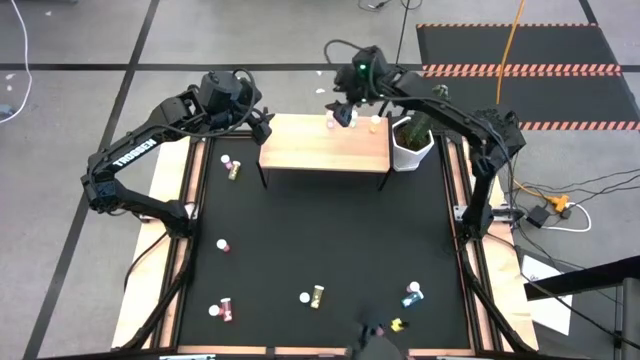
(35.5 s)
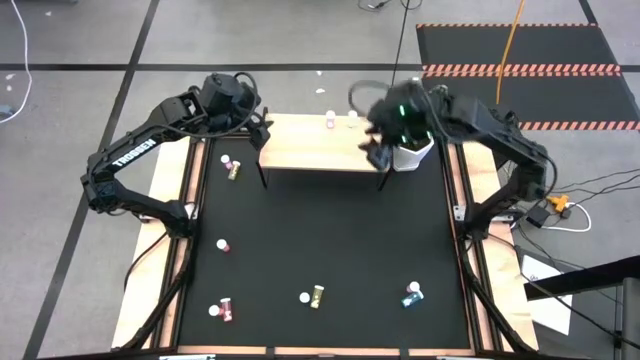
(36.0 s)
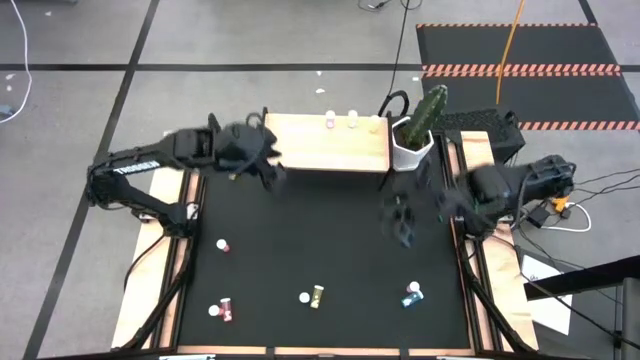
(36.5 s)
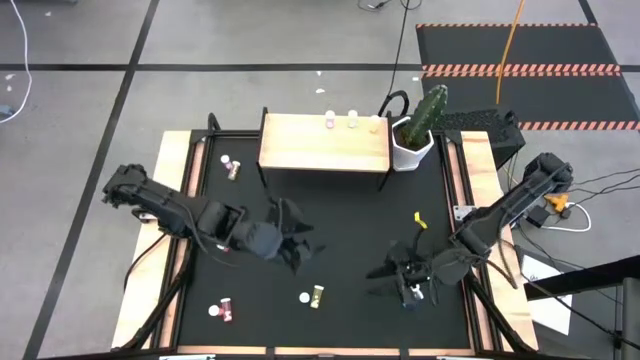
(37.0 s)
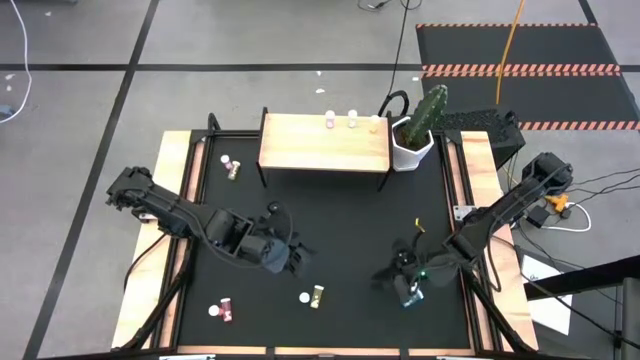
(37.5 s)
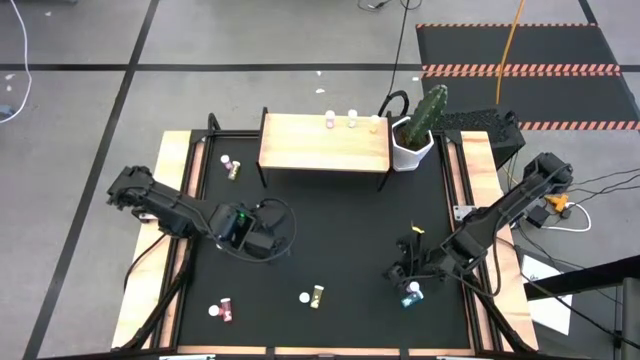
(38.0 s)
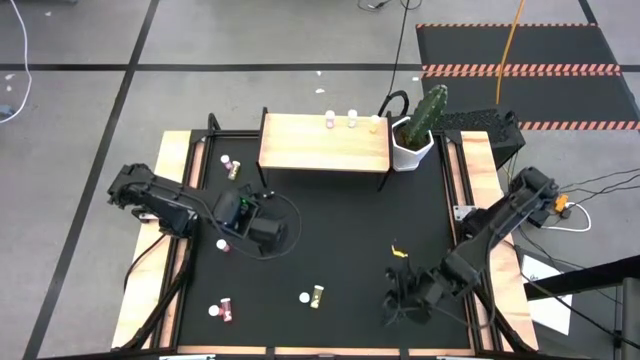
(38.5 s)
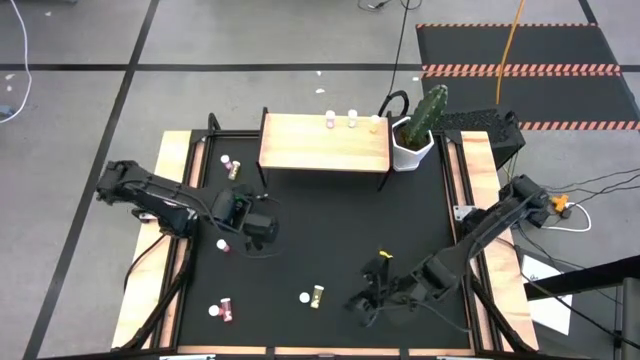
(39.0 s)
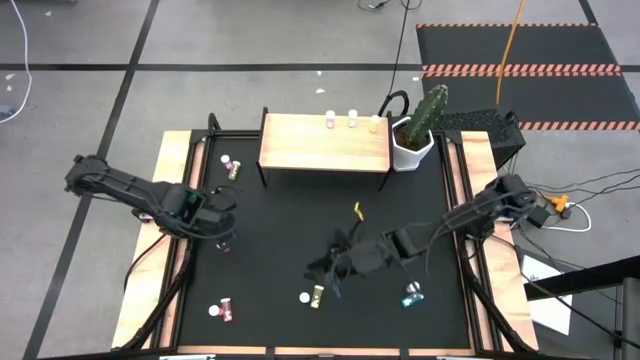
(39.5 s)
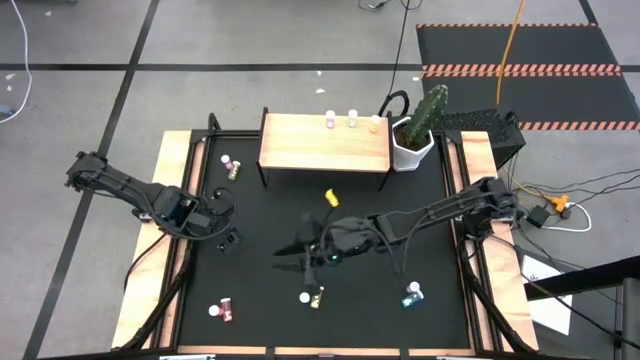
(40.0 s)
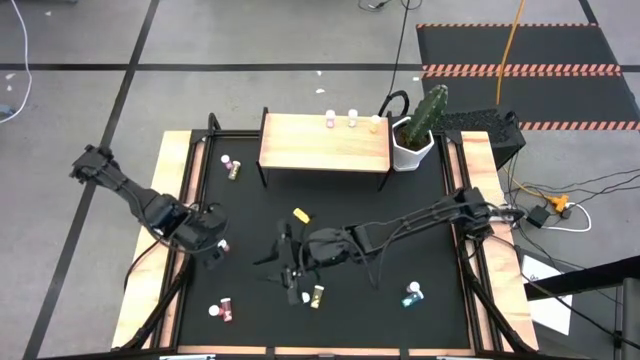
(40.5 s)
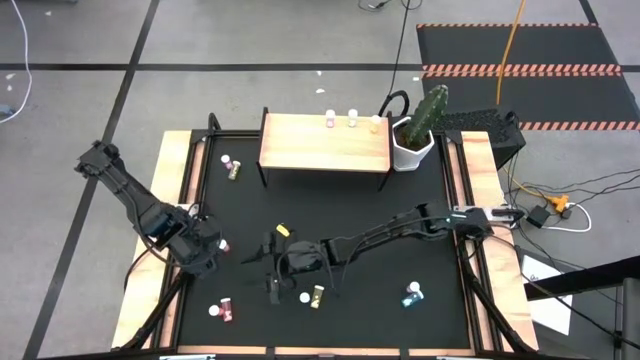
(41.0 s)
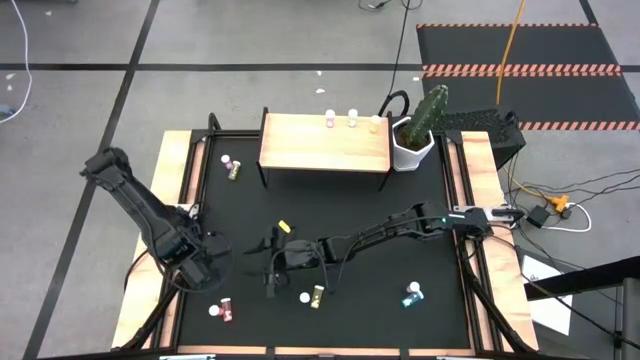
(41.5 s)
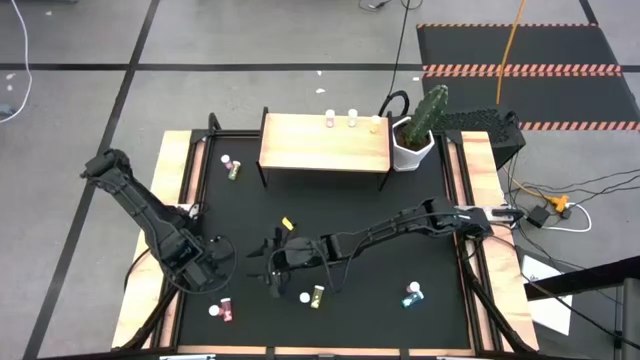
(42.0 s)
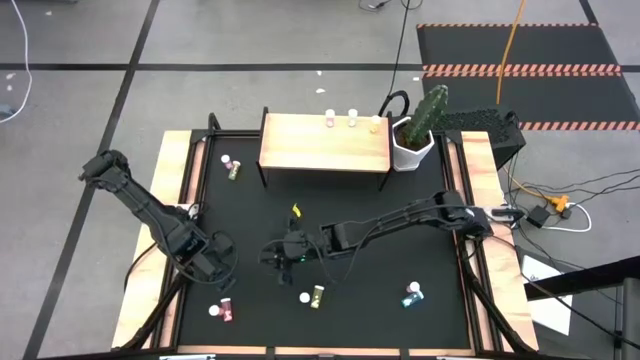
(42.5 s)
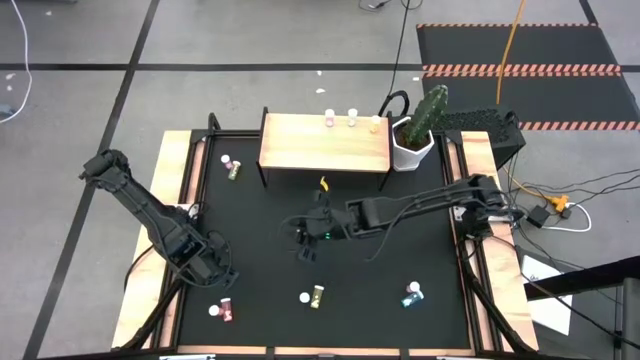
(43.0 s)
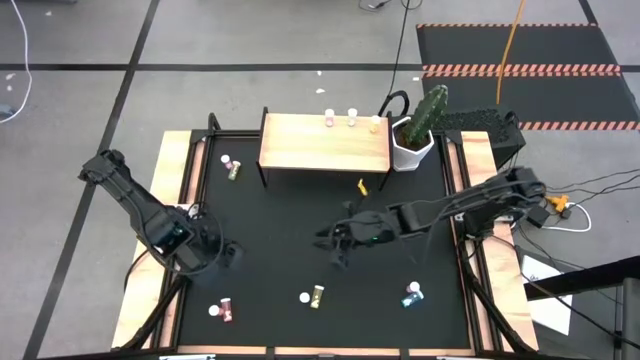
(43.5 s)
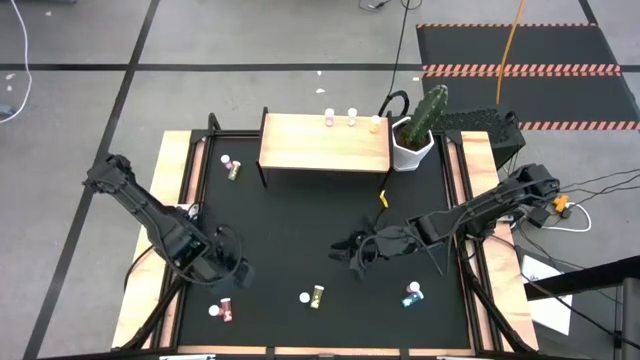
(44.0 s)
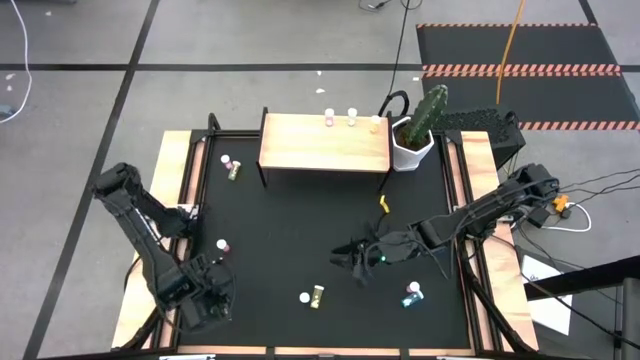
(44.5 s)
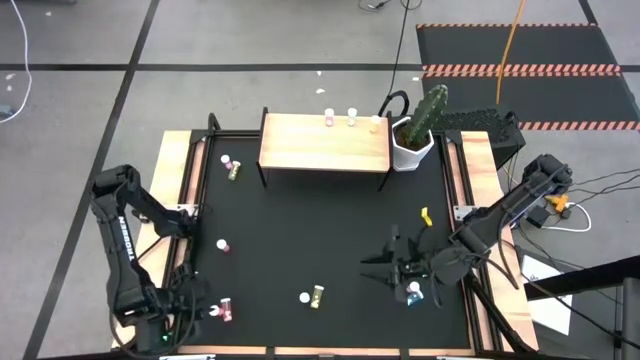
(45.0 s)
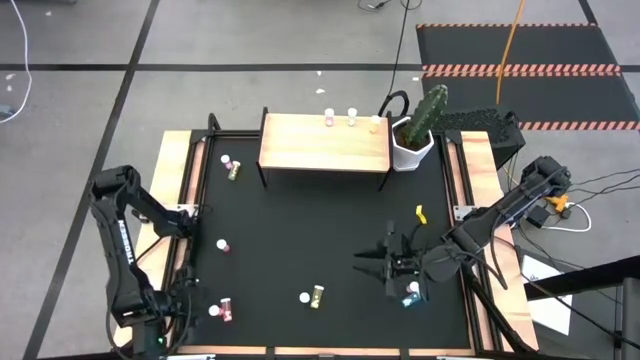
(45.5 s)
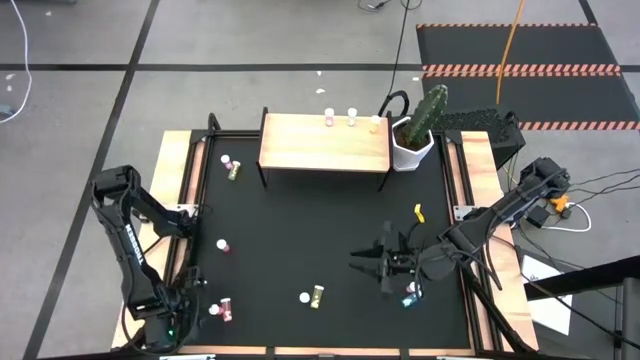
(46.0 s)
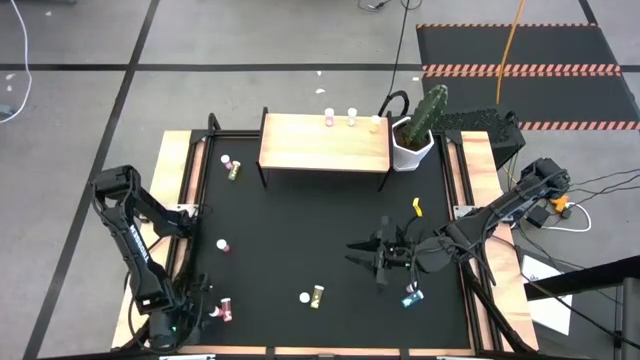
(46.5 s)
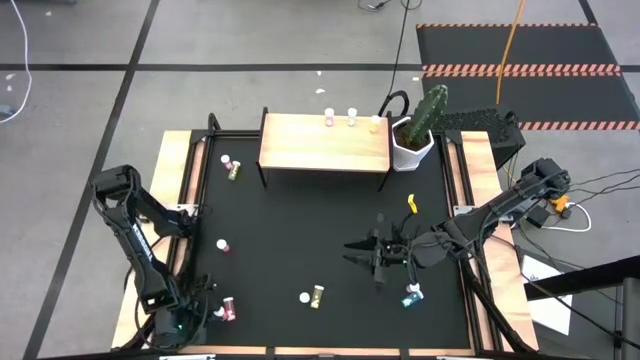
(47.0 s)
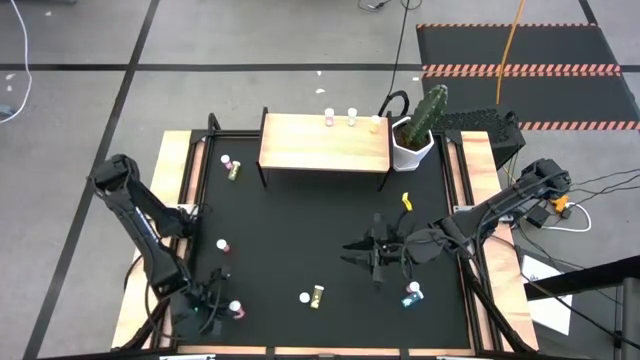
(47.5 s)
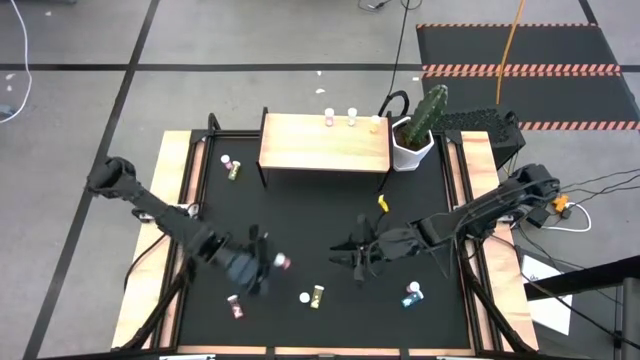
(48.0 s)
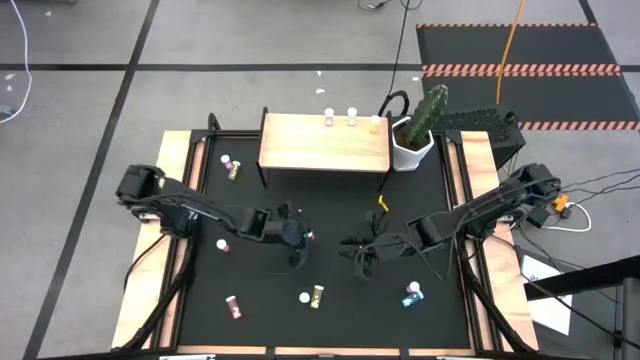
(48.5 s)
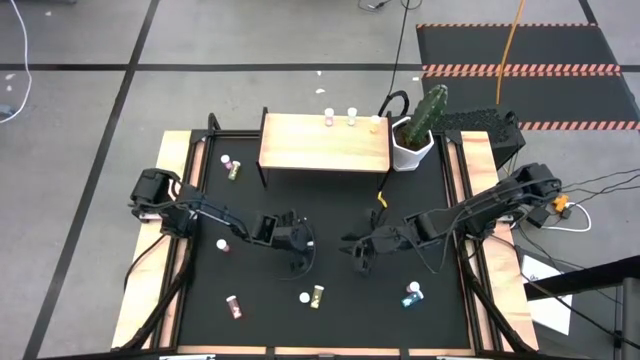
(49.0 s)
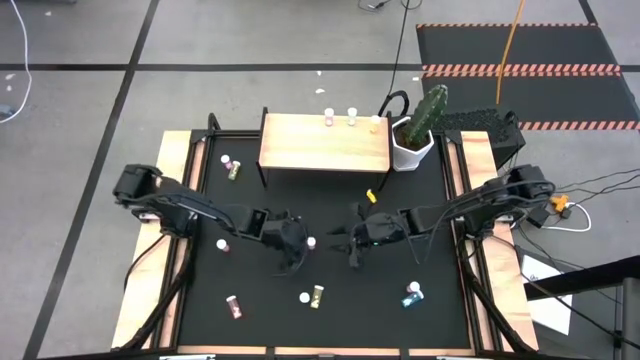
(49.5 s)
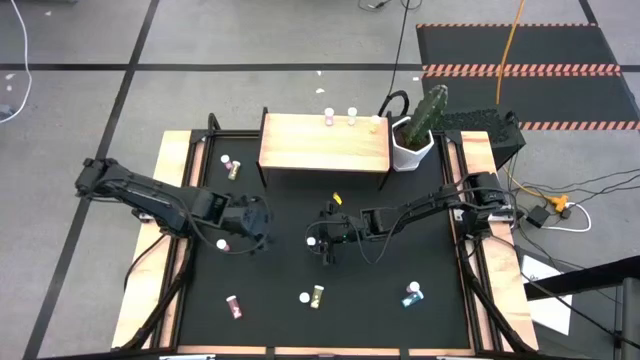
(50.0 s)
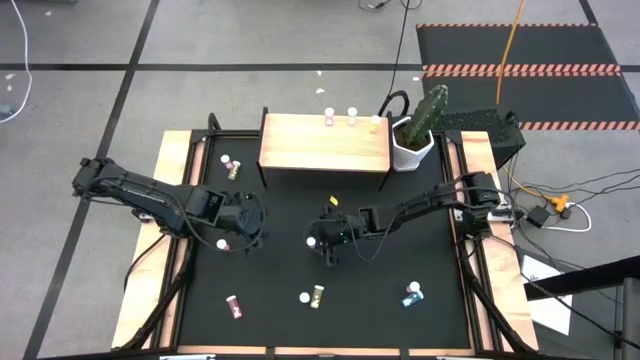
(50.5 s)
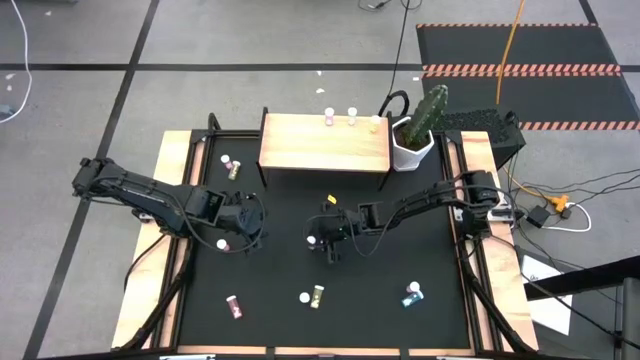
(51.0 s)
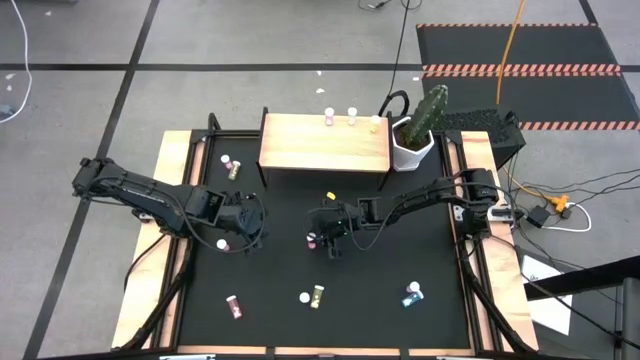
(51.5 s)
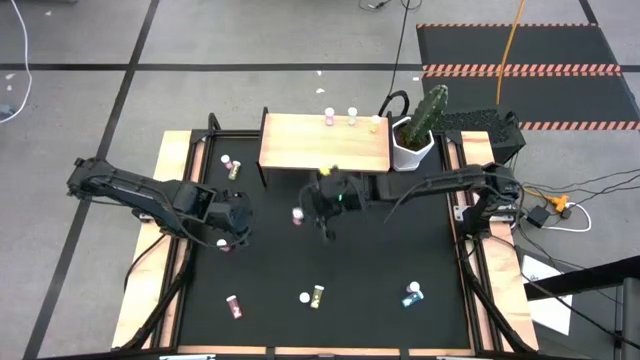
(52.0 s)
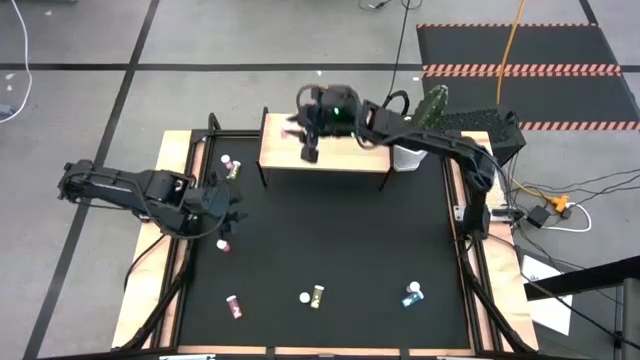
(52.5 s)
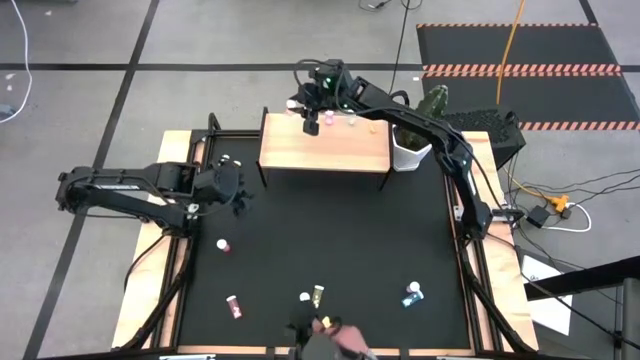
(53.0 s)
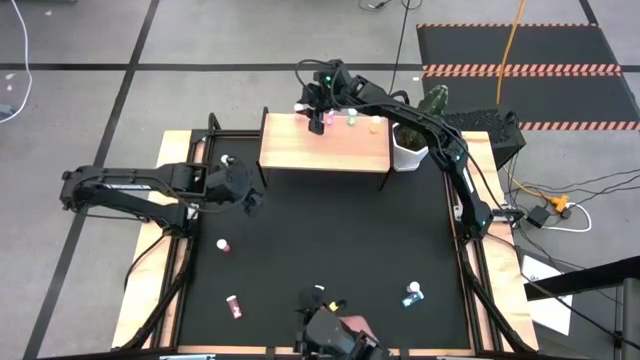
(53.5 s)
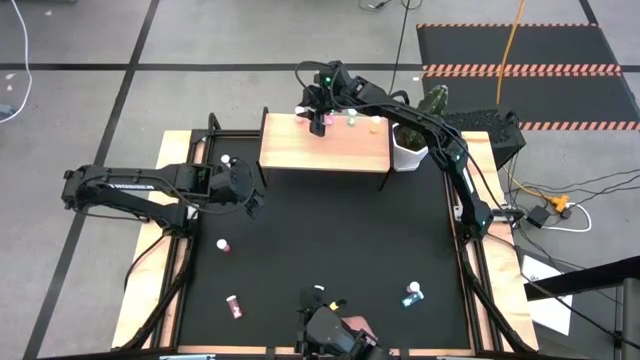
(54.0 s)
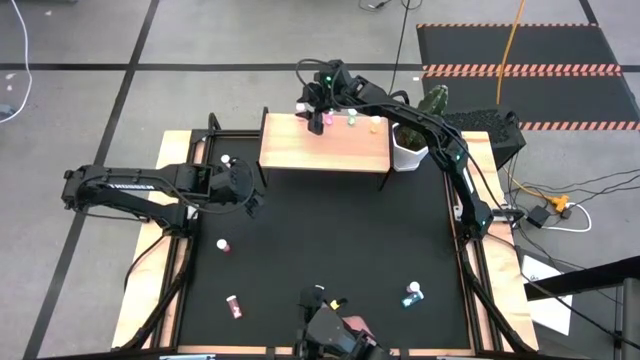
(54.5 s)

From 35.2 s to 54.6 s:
Task: Pick and place medicine bottles onto shelf by color
Put the bottom left red pill bottle on the shelf
